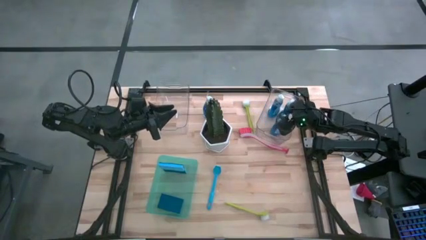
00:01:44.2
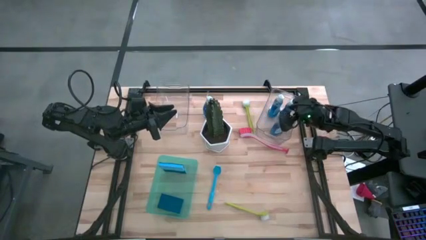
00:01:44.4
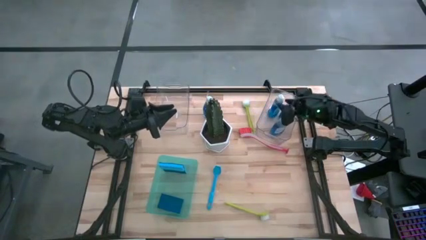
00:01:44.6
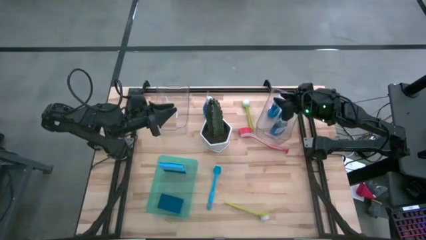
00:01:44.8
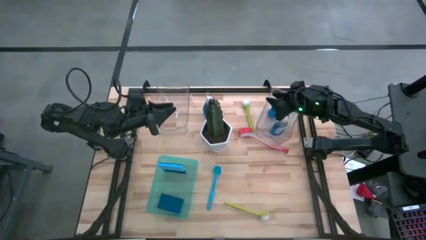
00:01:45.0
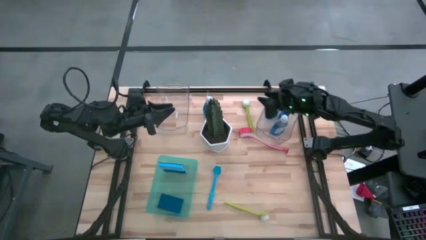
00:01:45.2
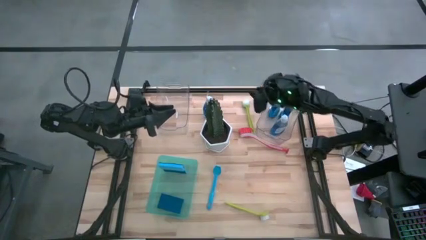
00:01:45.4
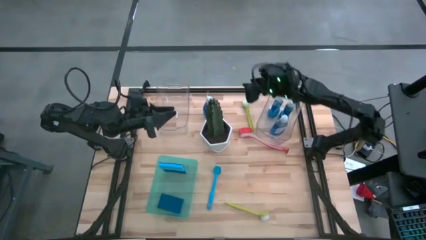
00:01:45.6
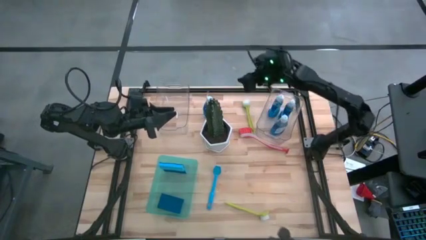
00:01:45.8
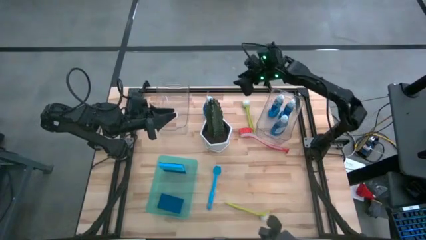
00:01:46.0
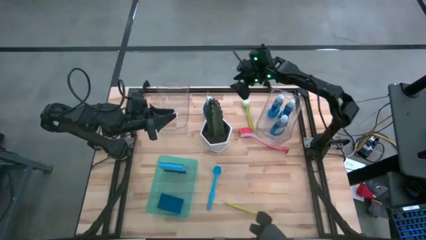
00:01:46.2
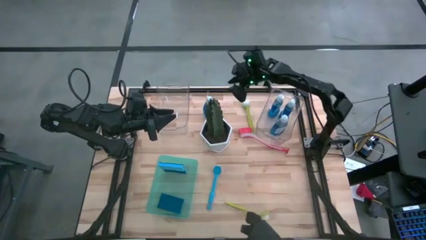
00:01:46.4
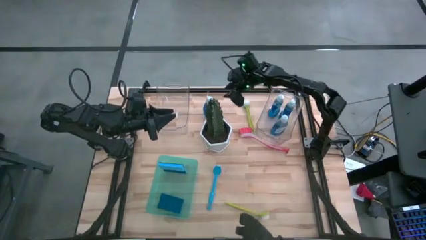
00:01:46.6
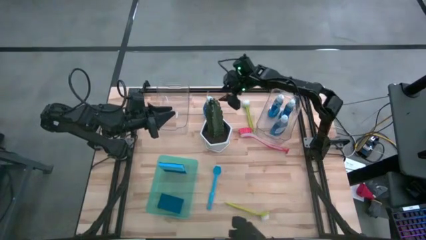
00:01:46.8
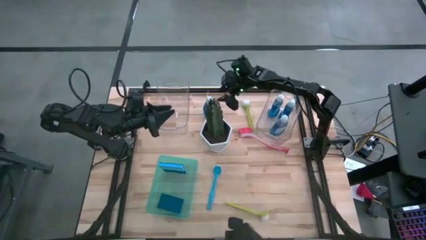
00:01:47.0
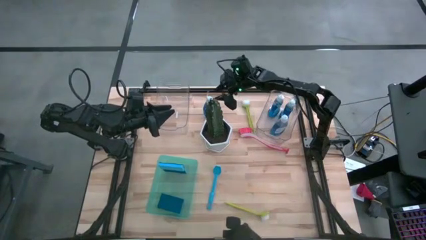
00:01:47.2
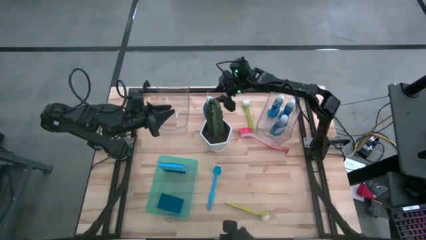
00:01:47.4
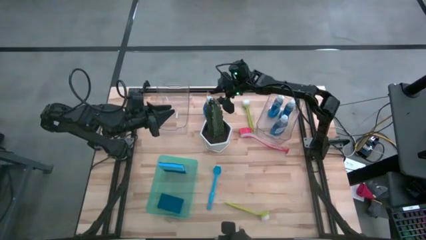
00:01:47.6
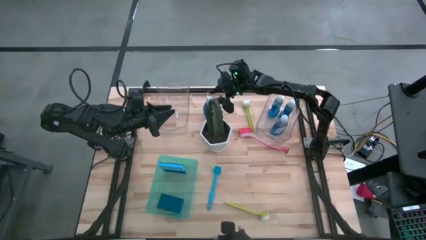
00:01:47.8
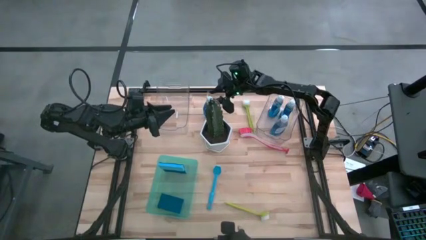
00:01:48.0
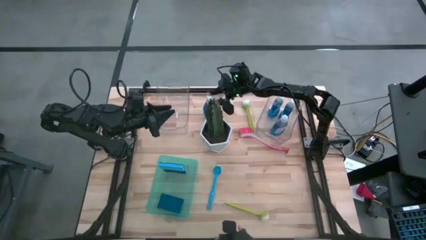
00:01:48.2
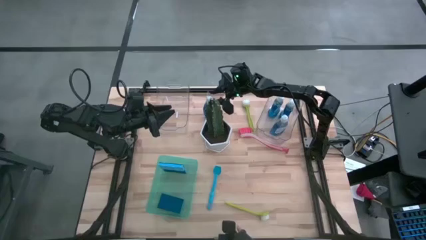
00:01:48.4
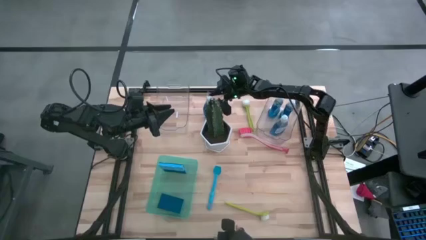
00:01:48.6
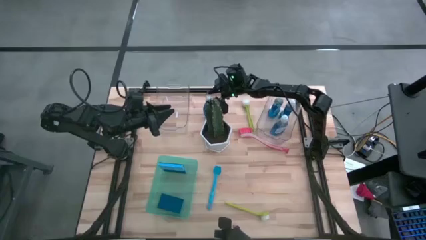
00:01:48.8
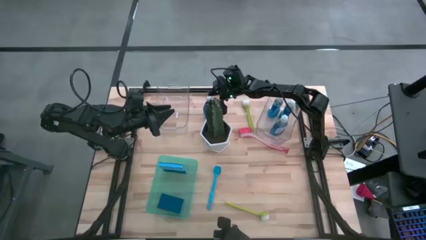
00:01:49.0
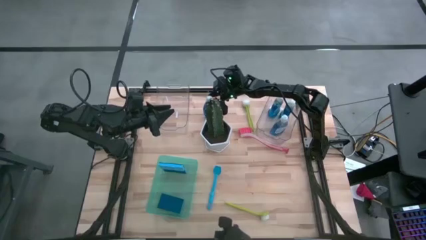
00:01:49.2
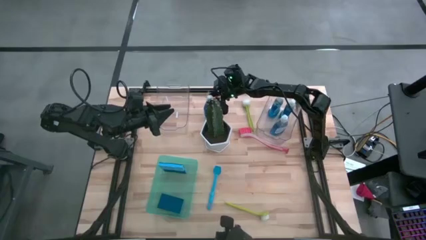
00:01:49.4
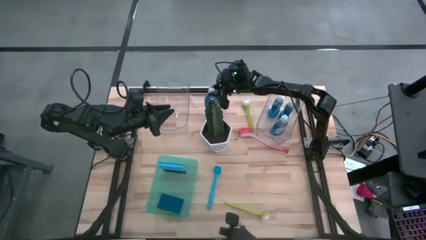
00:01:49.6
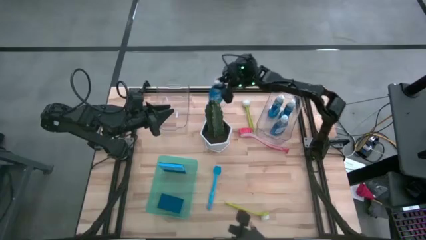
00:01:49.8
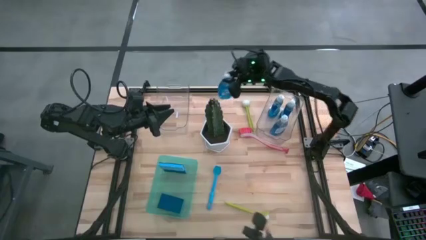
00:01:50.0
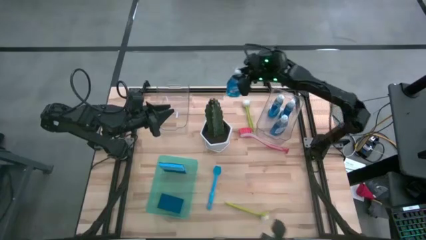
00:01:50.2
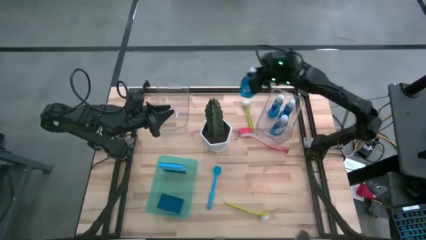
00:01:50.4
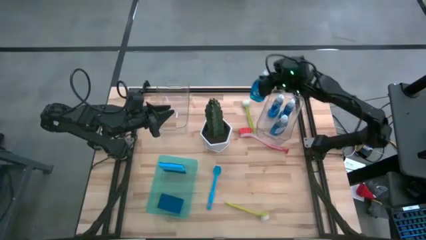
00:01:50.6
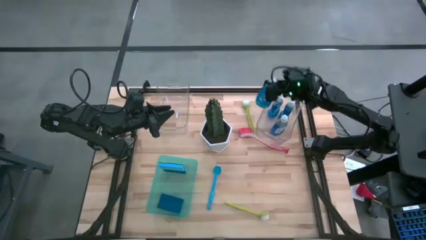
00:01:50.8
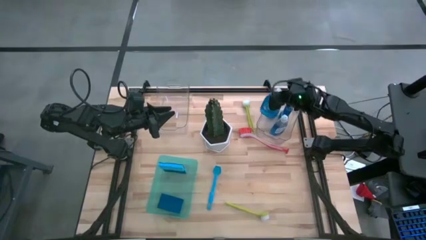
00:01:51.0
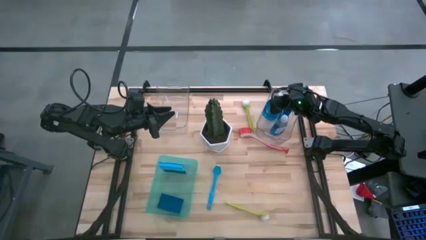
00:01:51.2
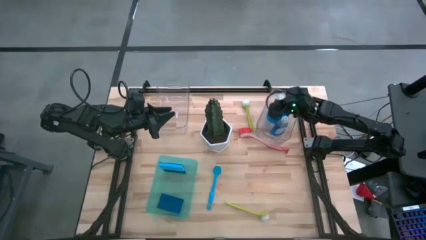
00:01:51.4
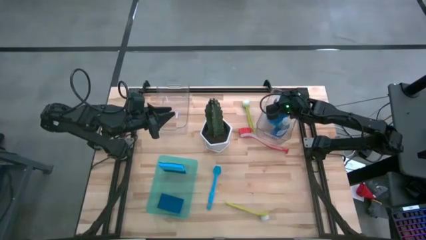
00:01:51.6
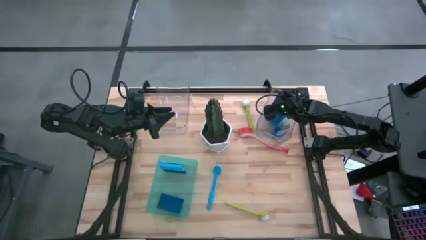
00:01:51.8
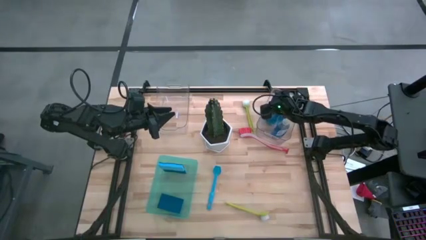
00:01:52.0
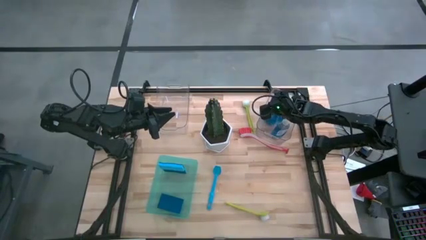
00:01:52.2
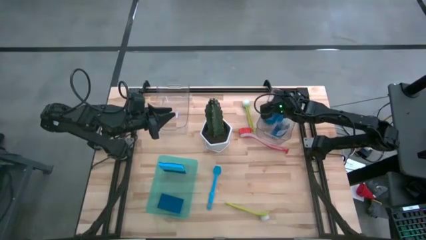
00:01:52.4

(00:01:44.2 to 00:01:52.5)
Task: Pick & Place Kitchen Sink Supplies
Put the blue dishwashing liquid bottle into the right transparent bin

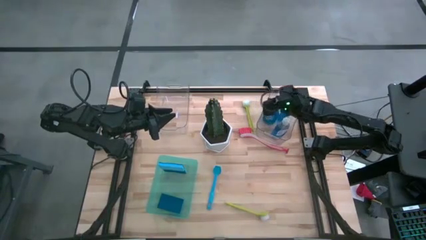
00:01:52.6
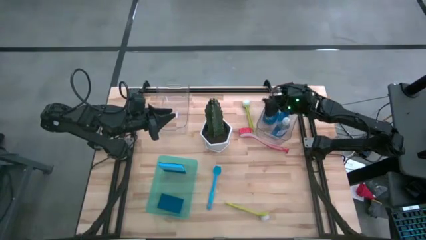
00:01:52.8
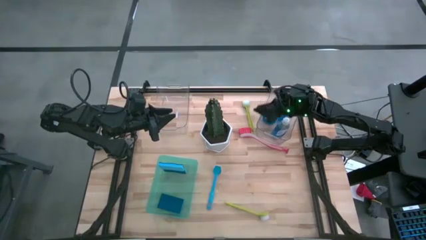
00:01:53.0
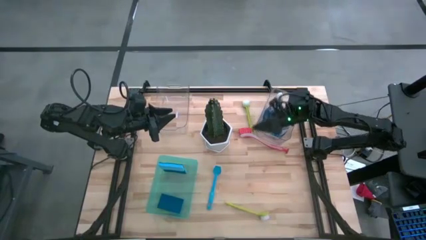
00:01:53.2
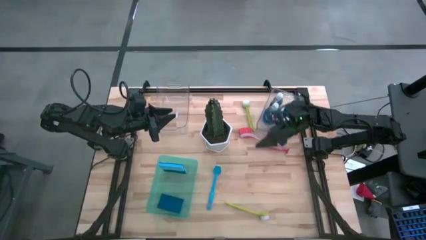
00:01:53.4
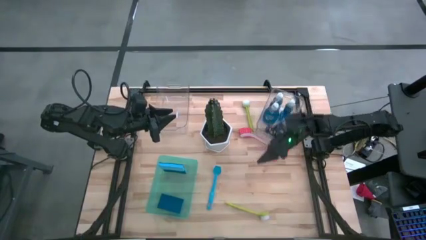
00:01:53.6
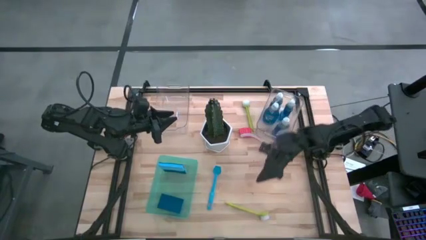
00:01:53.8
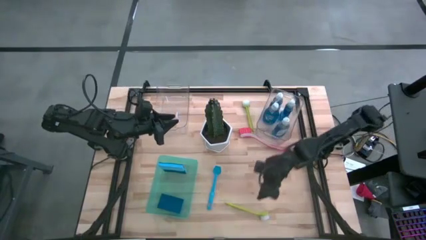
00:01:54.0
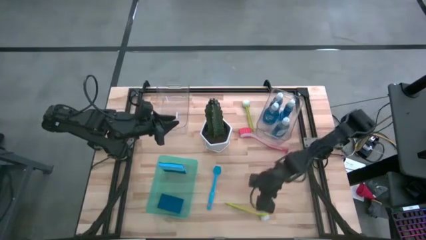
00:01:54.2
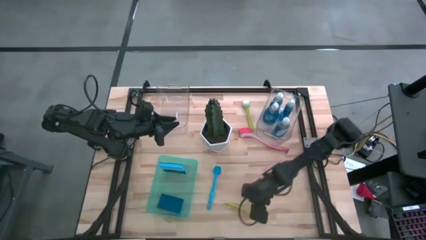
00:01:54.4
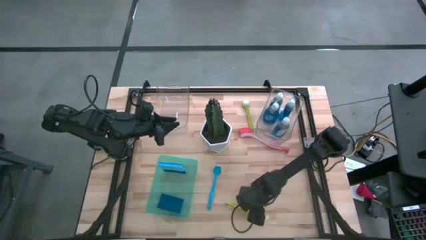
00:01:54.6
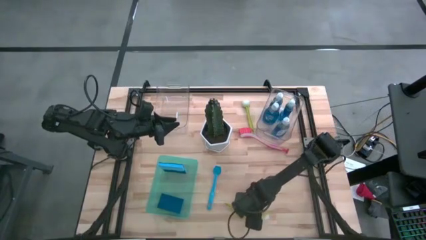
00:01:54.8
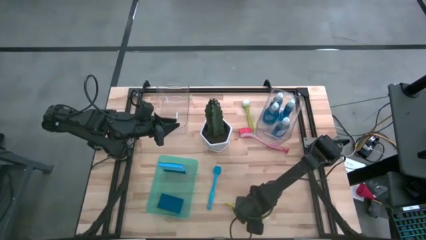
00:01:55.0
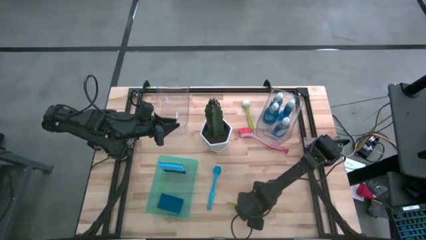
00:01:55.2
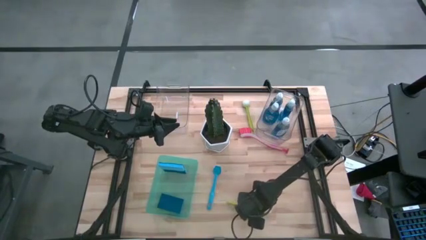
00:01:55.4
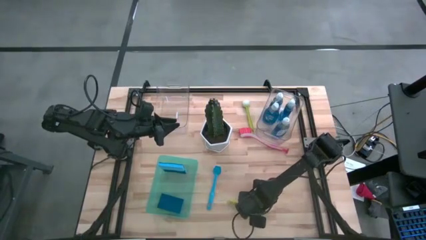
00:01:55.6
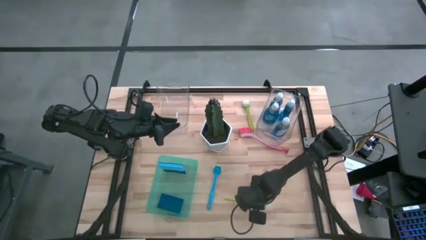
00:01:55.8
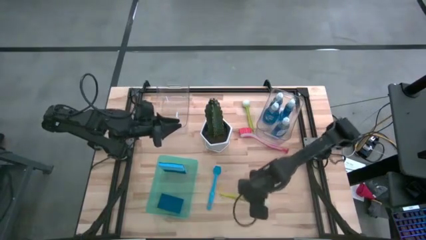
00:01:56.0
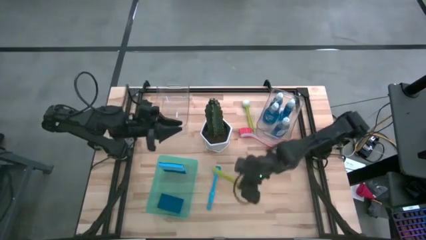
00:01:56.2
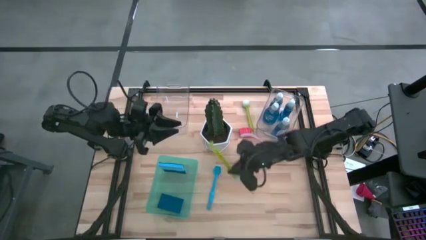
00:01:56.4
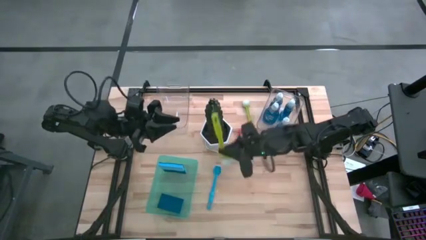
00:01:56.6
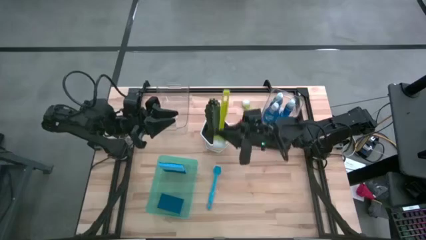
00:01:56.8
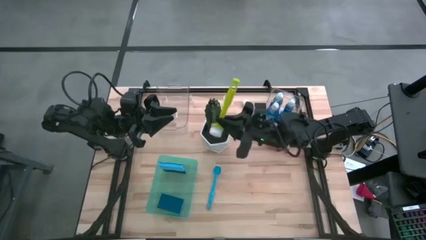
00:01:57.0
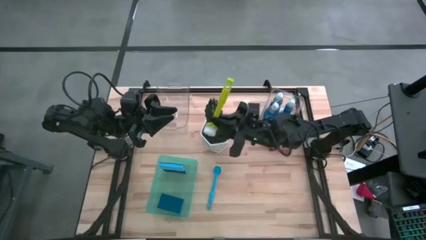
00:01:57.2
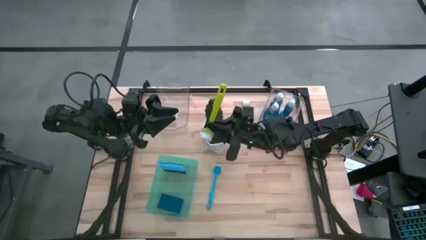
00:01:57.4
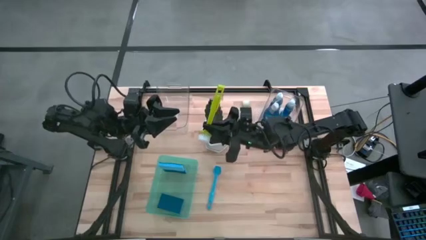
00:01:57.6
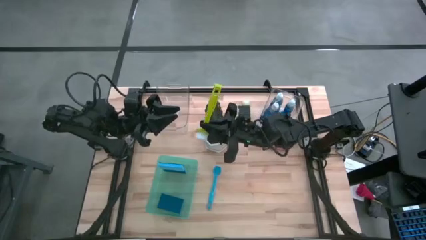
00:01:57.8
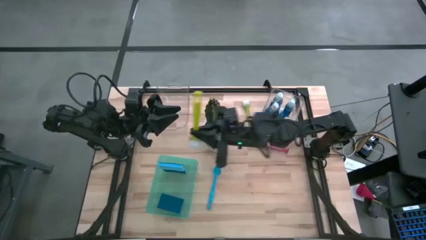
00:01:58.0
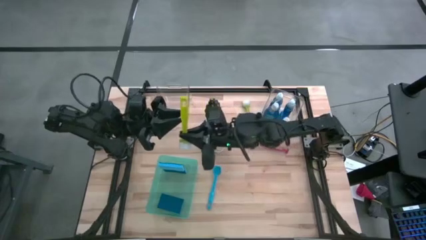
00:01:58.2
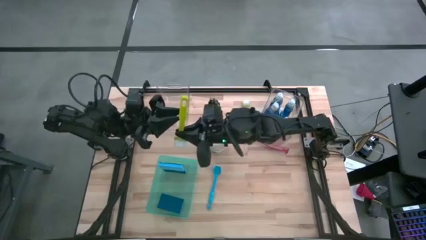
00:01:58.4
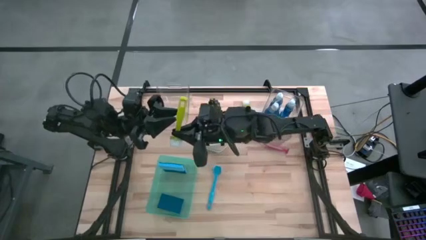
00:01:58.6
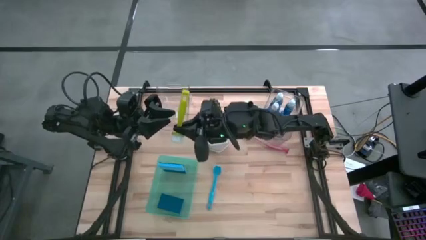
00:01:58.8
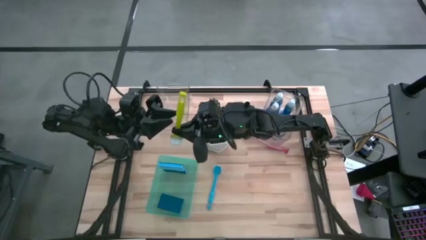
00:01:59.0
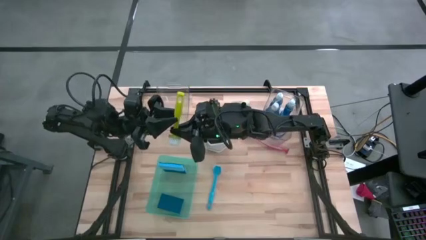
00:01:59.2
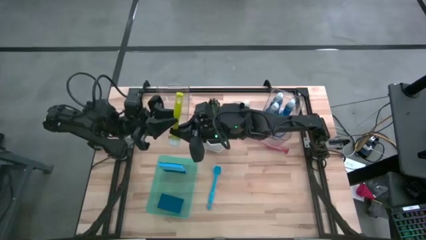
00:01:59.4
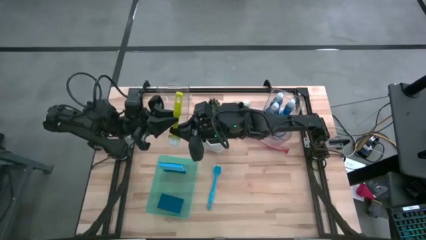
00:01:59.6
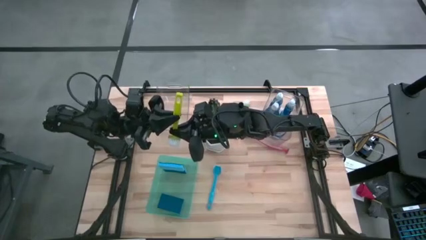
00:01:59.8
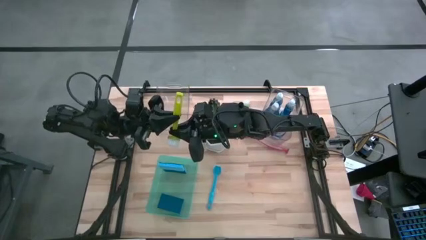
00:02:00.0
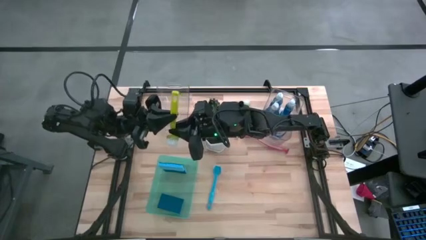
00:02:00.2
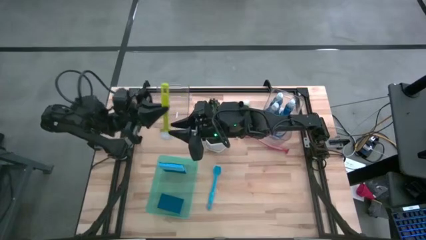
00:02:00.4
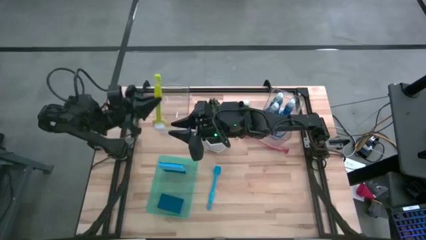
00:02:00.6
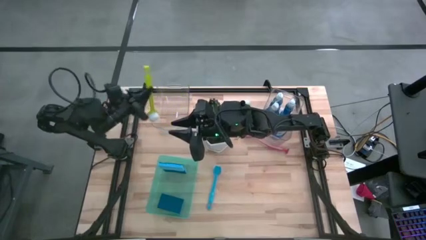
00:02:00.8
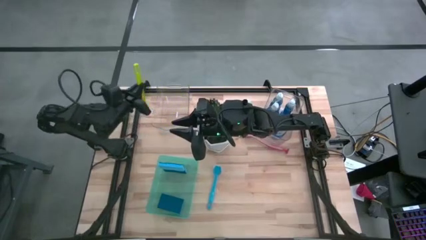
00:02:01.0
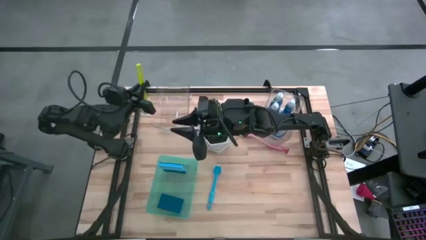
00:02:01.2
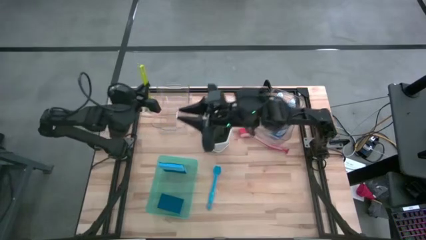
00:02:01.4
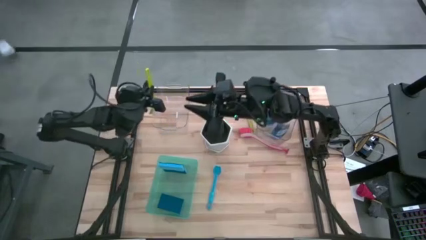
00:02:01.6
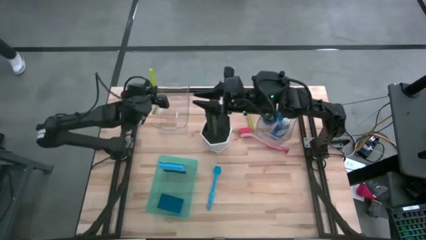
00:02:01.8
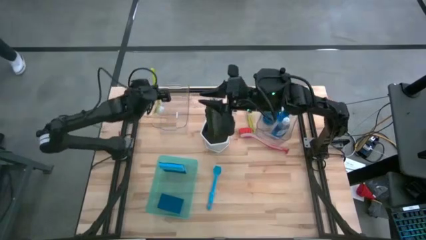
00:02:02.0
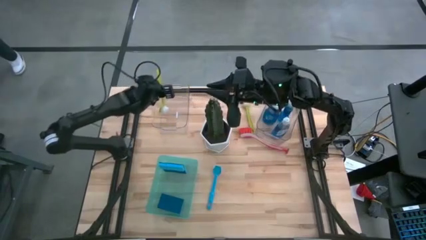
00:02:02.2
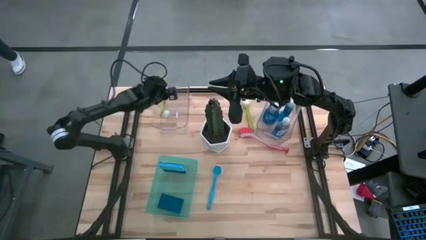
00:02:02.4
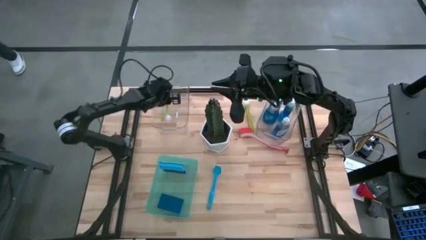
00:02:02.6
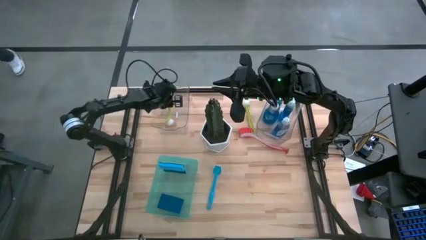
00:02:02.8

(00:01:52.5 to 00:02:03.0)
Put the light green dishwashing brush into the left transparent bin
